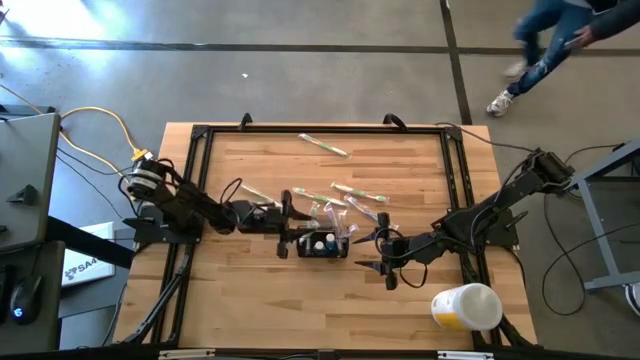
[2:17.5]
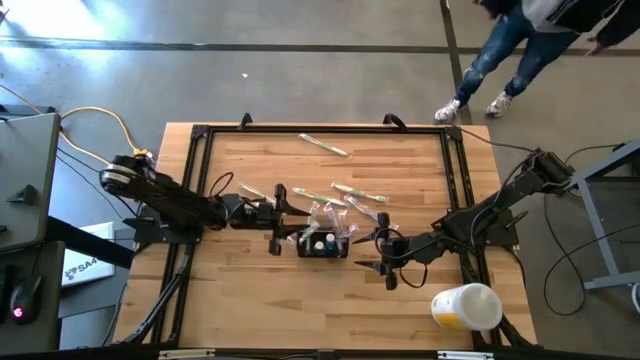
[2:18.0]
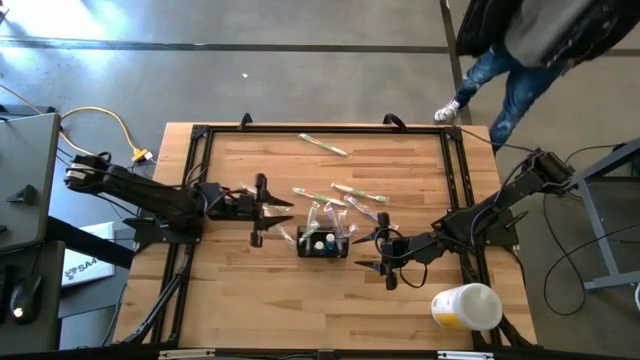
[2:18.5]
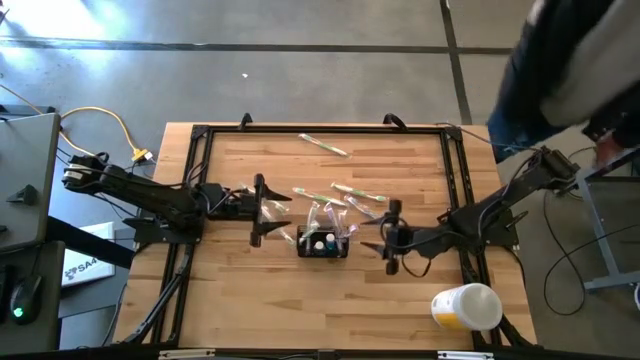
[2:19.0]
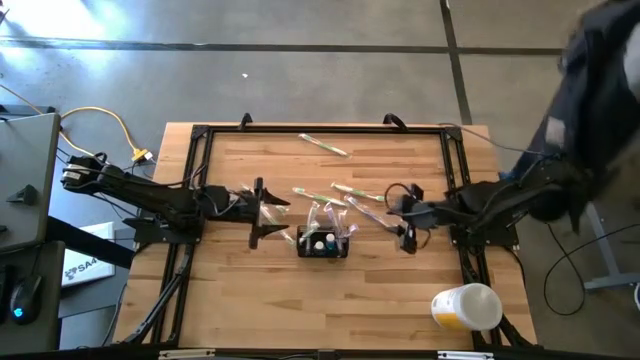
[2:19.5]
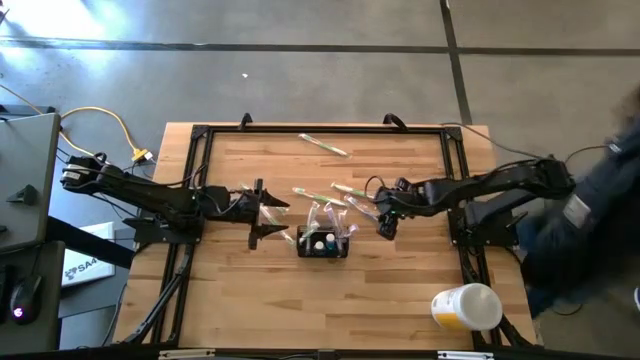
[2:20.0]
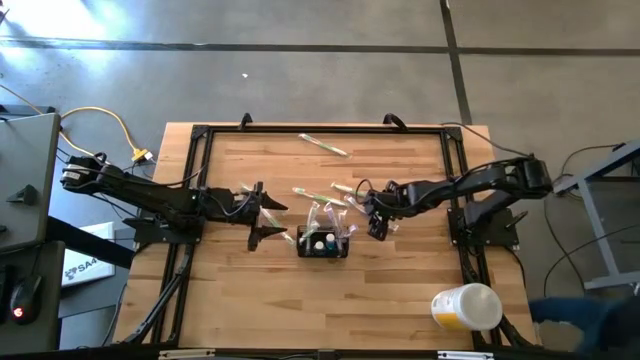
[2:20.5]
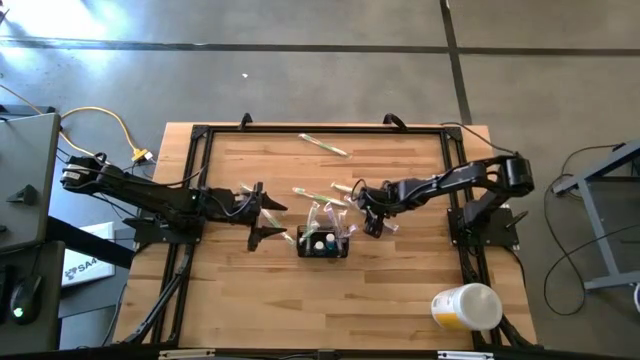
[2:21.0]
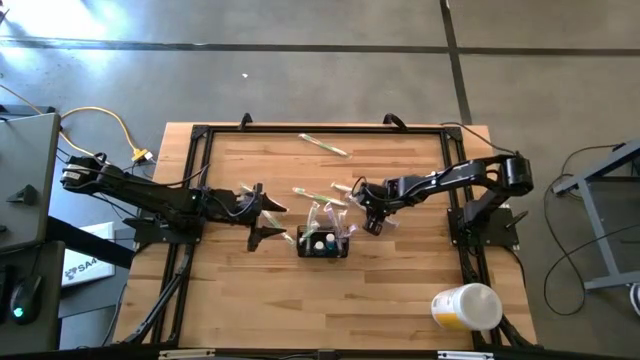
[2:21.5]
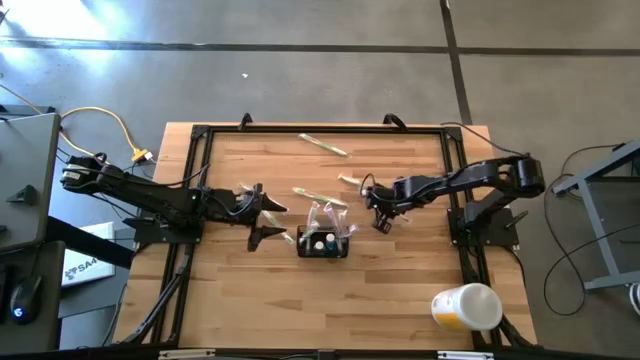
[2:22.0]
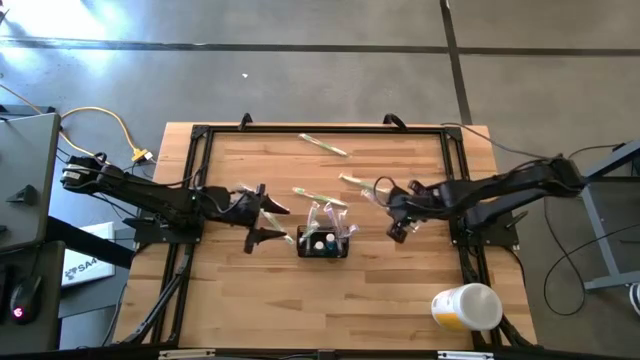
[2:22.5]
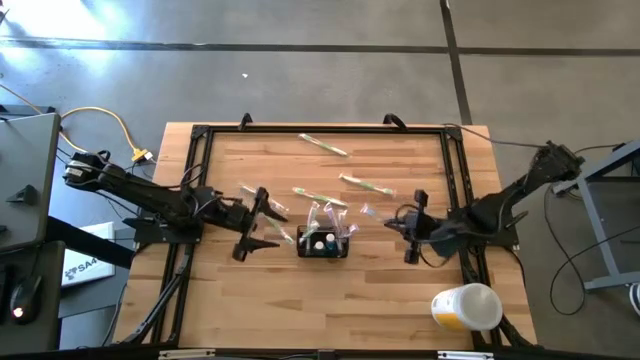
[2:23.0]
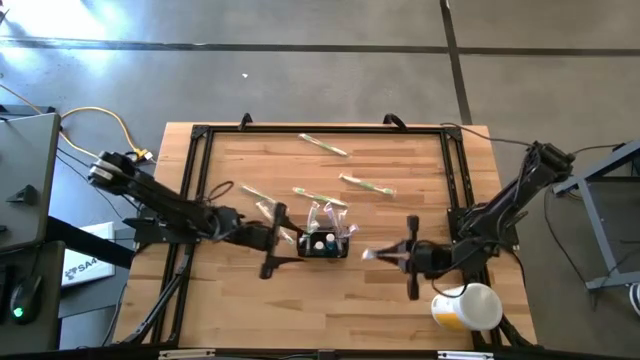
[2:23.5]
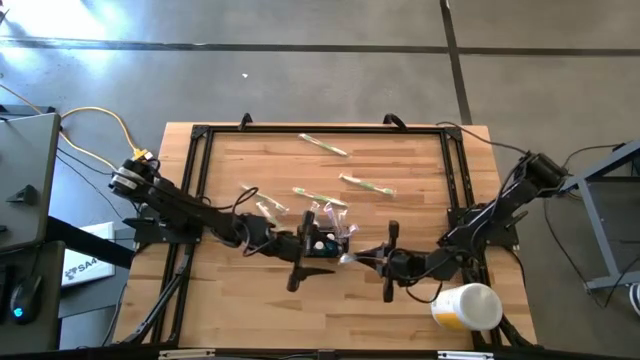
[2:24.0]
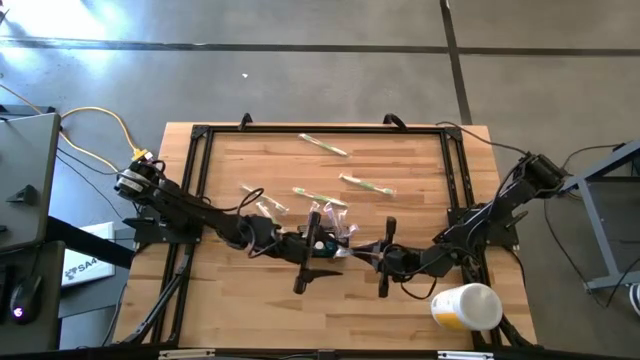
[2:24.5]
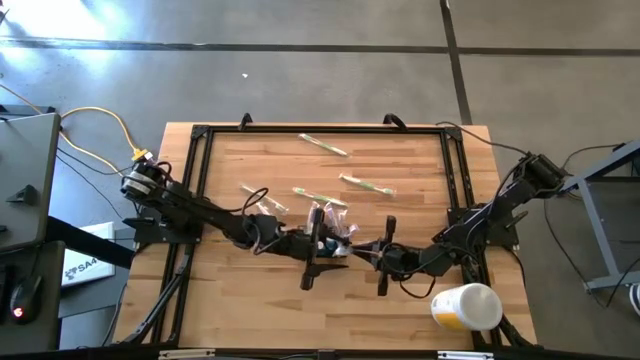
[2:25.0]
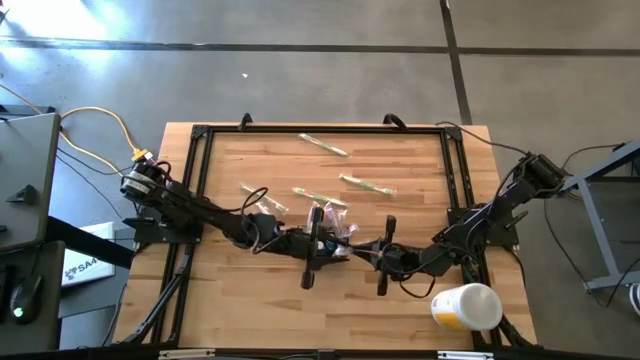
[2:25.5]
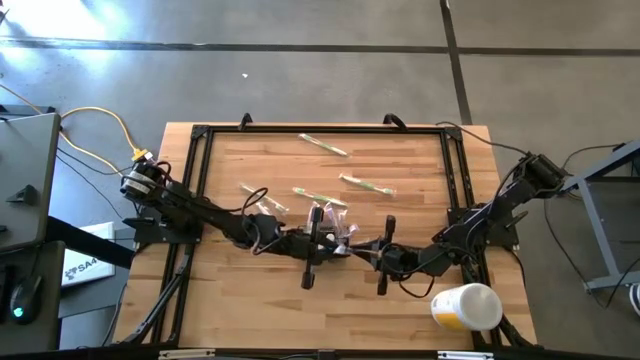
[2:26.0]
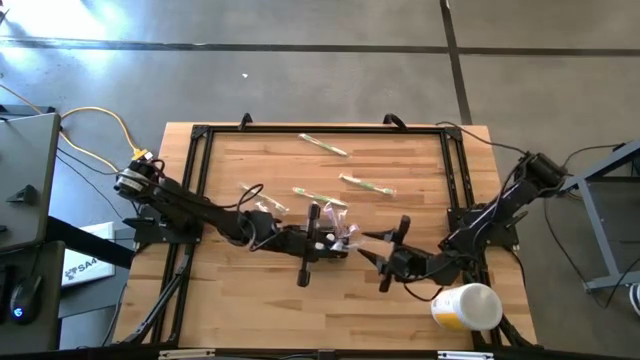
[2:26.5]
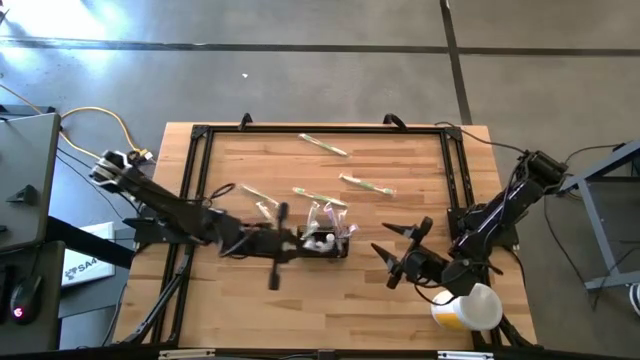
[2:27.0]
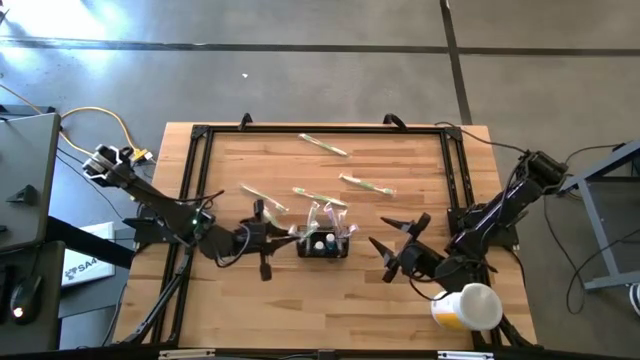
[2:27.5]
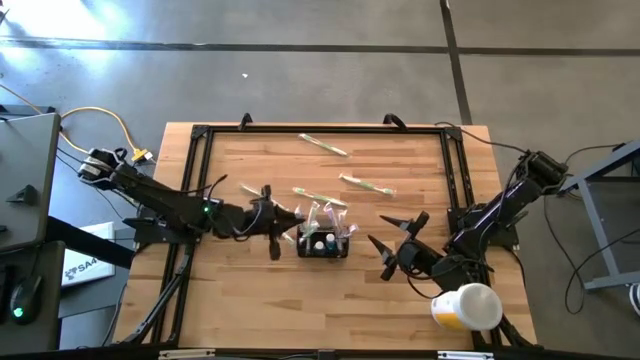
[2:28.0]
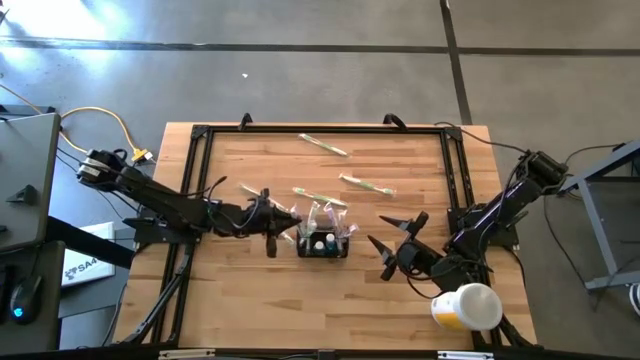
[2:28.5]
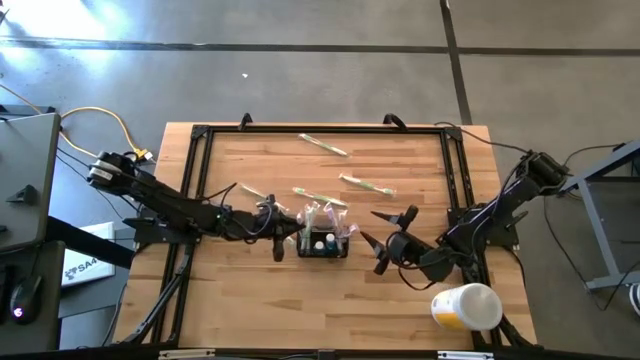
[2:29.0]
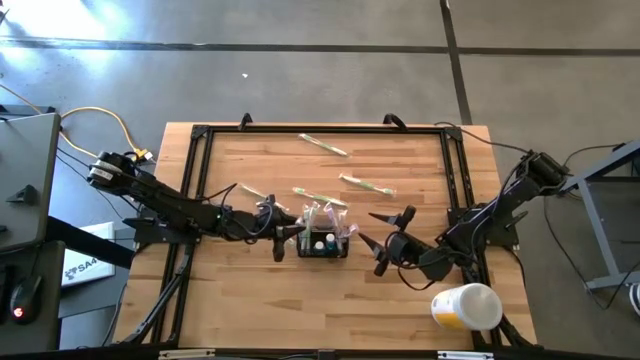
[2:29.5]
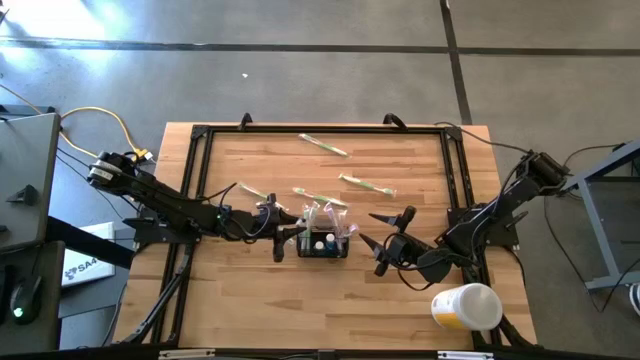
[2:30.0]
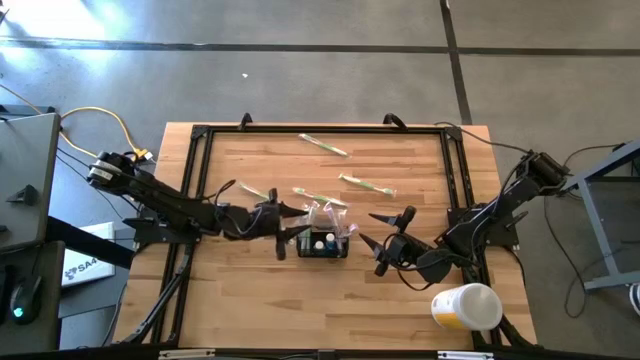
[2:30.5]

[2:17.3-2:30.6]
Task: Pick & Place toothbrushing station
Put the blue toothbrush into the wire organizer

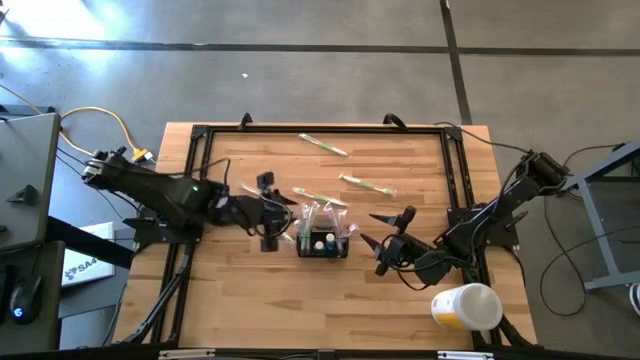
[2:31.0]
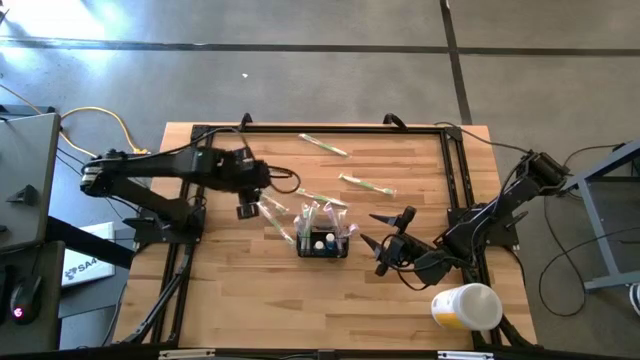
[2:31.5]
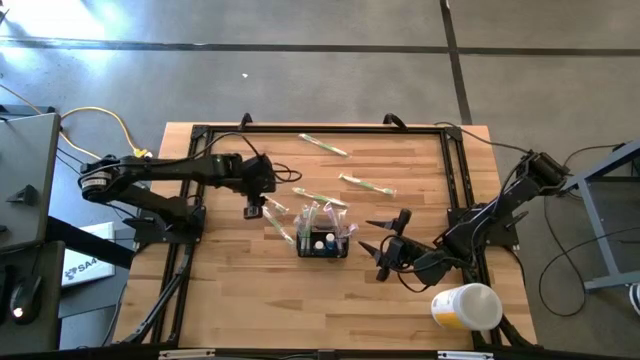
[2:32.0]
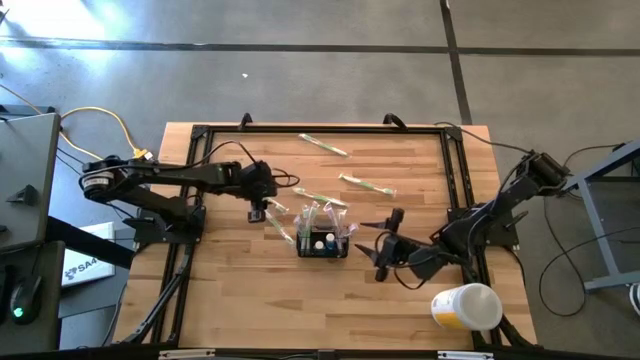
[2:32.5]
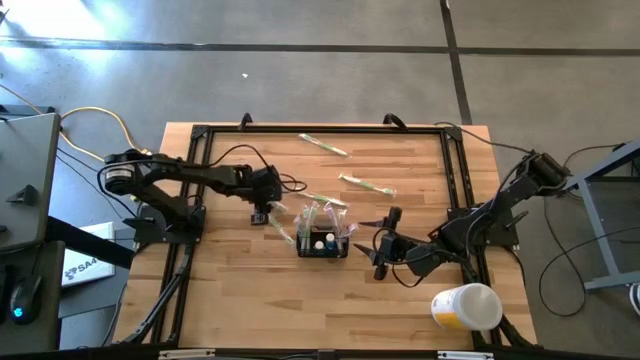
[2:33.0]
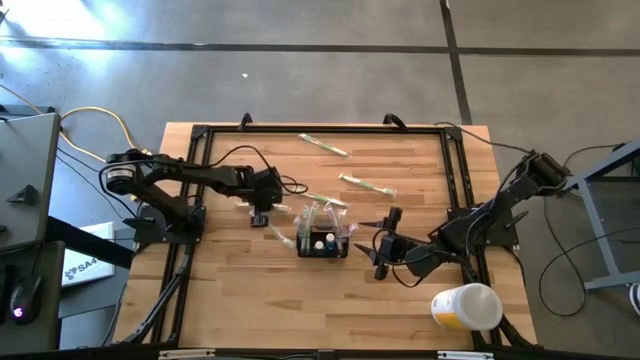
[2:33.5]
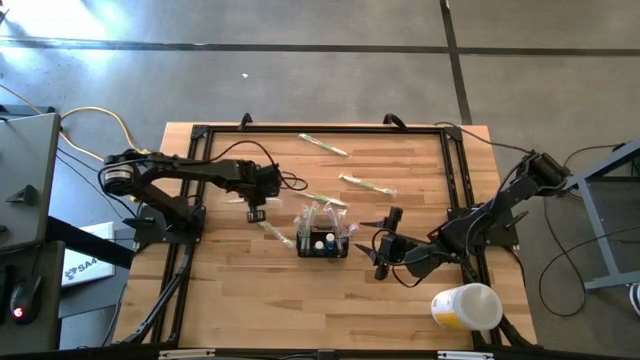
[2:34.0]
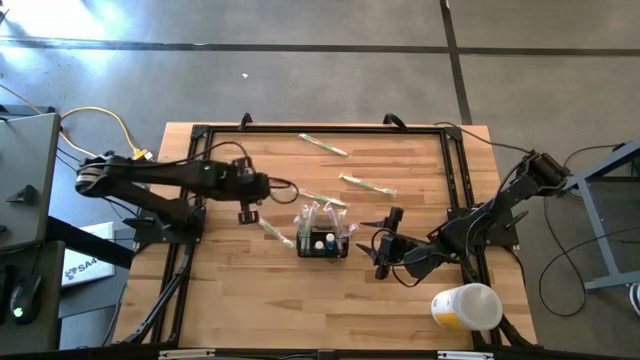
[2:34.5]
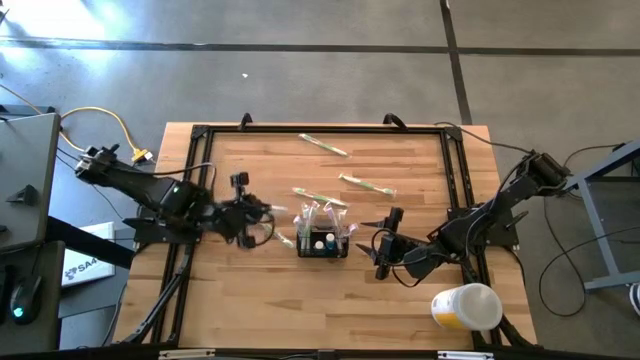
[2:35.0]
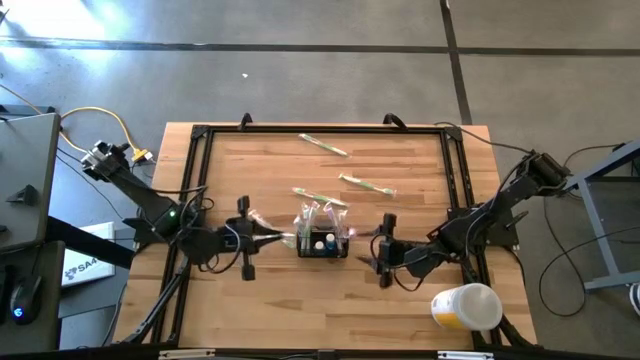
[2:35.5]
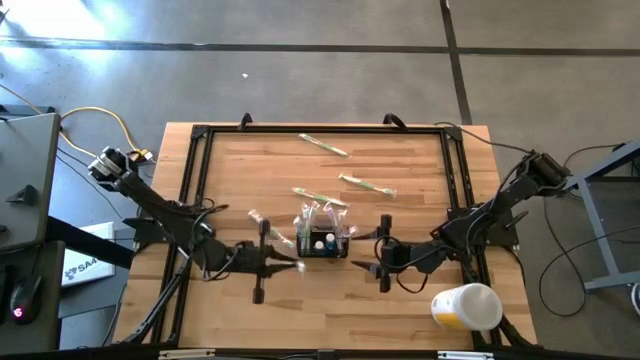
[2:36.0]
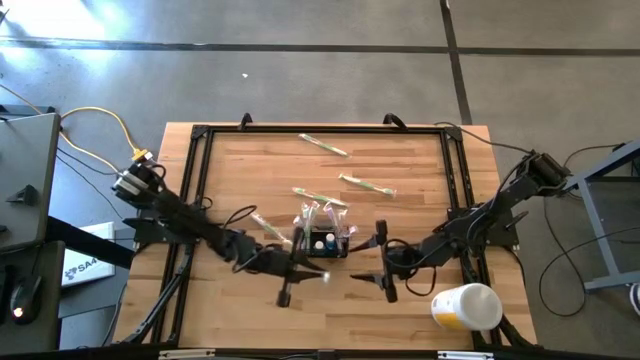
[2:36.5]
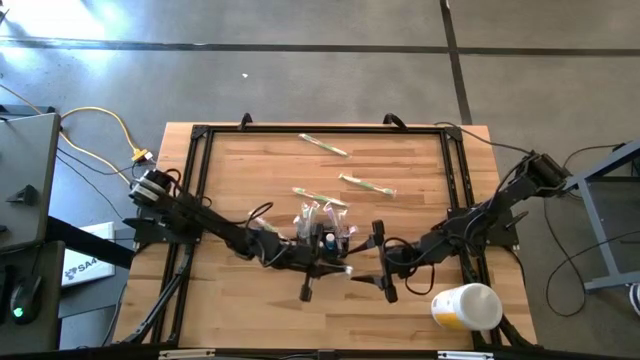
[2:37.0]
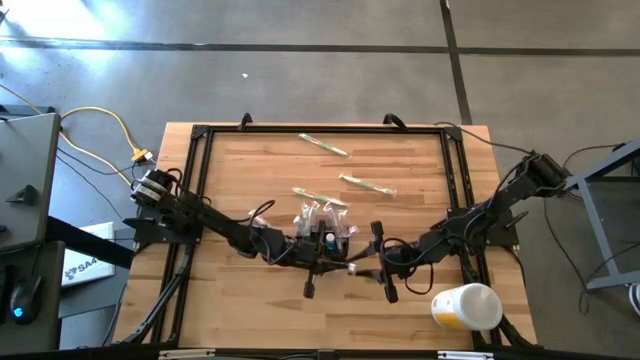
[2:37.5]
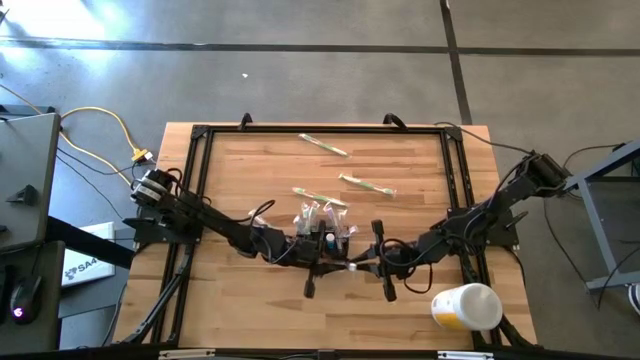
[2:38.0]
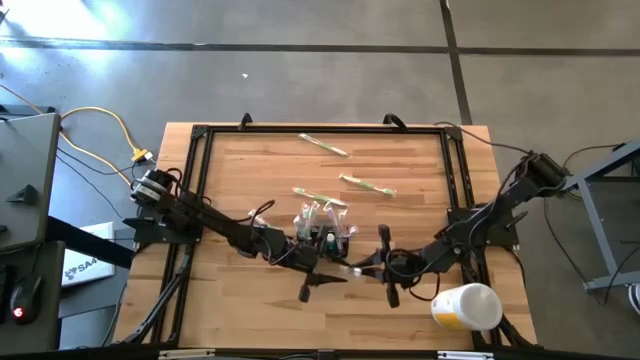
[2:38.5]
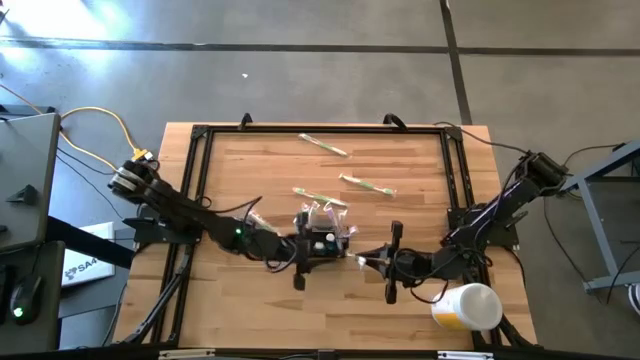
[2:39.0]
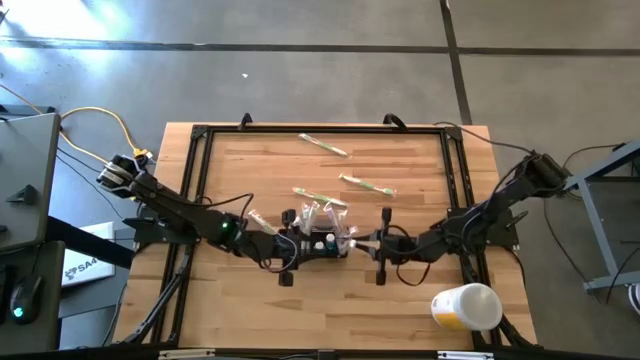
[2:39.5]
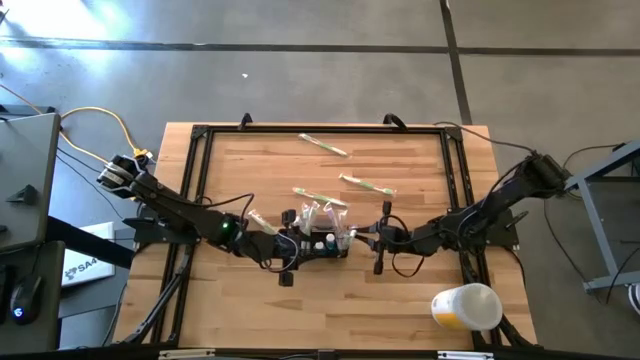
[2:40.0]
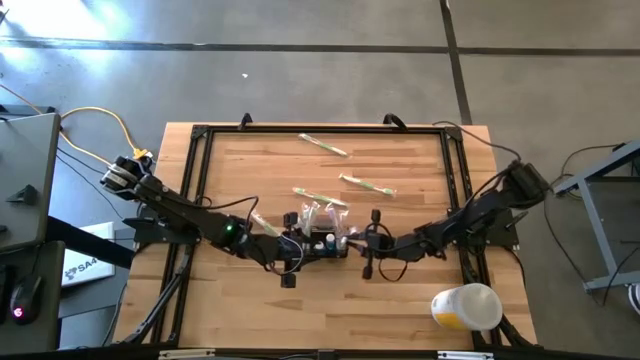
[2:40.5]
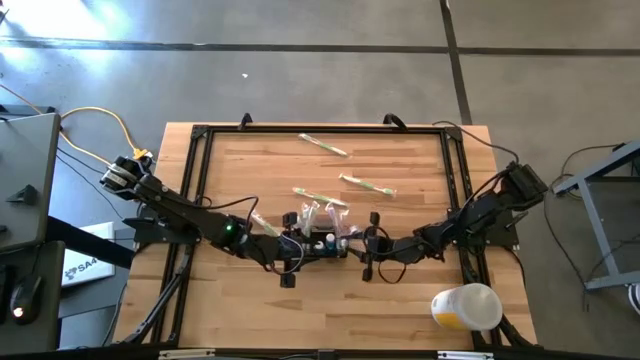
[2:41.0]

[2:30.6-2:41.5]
Put the green toothbrush into the wire organizer
